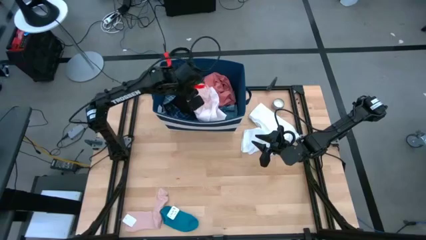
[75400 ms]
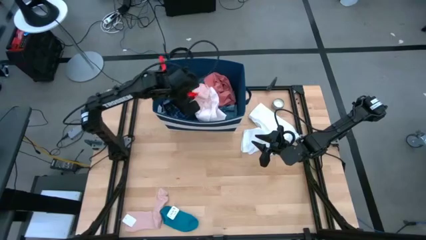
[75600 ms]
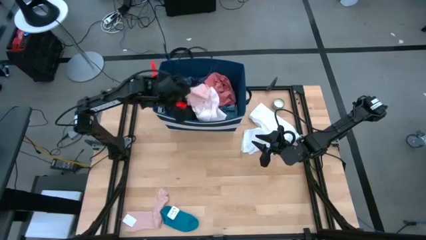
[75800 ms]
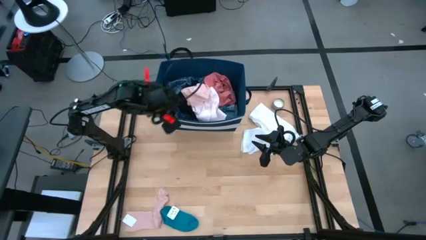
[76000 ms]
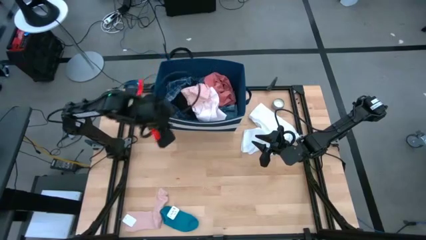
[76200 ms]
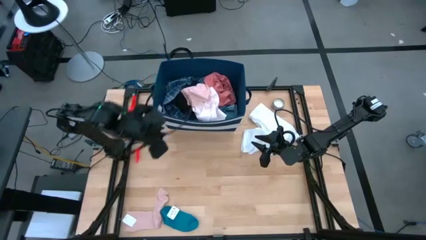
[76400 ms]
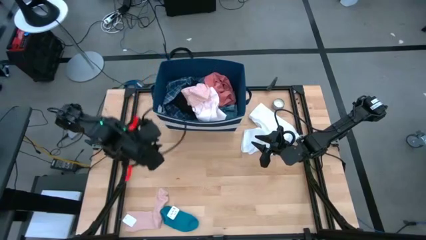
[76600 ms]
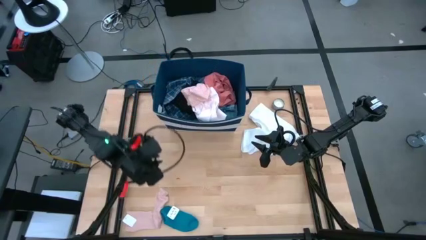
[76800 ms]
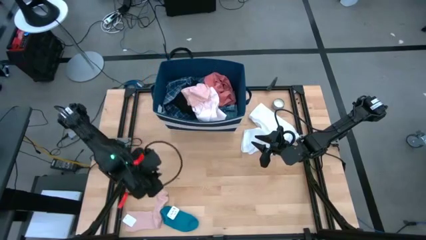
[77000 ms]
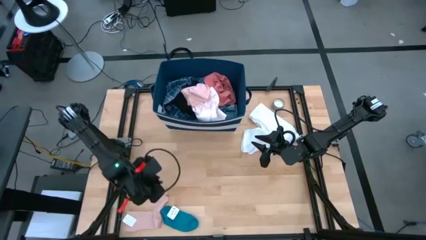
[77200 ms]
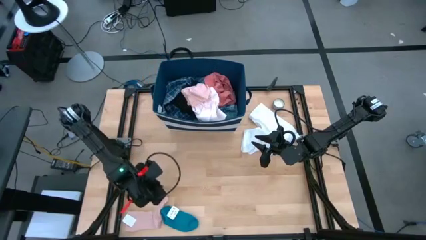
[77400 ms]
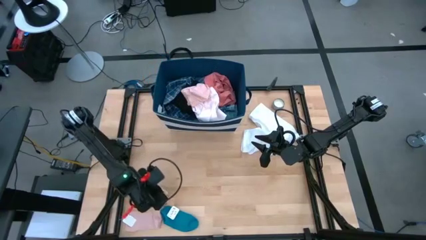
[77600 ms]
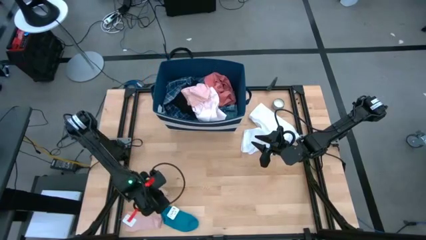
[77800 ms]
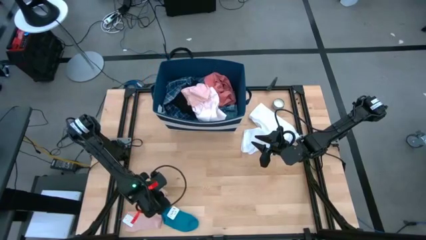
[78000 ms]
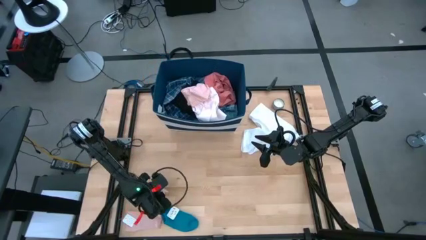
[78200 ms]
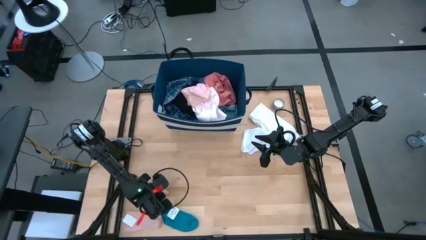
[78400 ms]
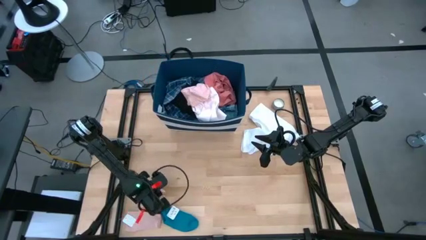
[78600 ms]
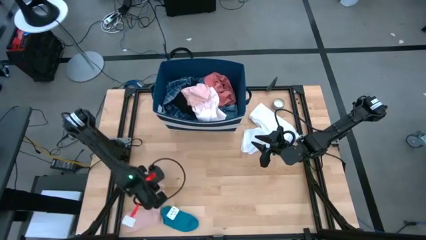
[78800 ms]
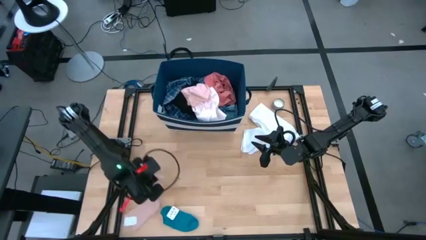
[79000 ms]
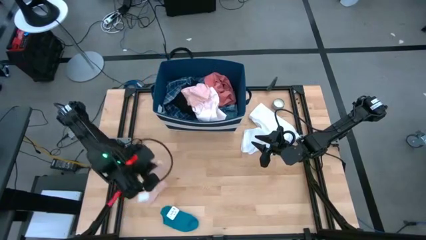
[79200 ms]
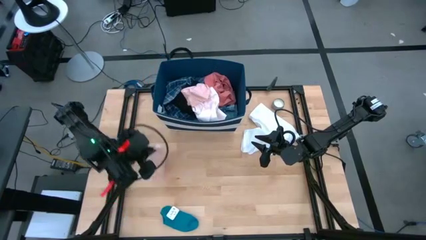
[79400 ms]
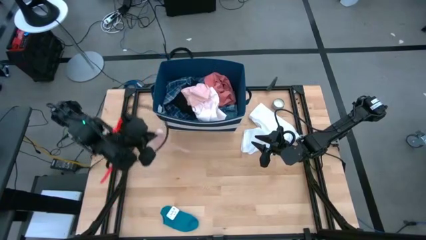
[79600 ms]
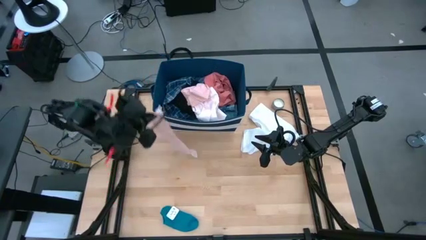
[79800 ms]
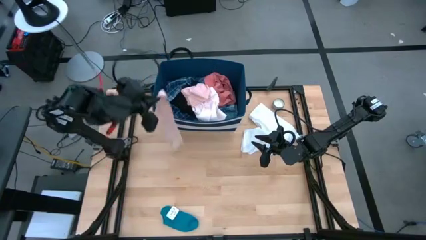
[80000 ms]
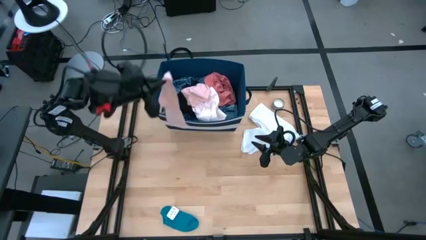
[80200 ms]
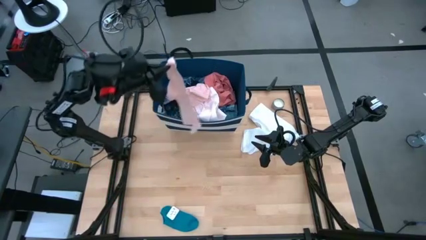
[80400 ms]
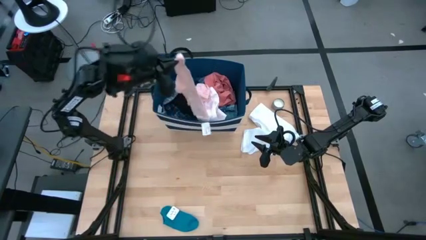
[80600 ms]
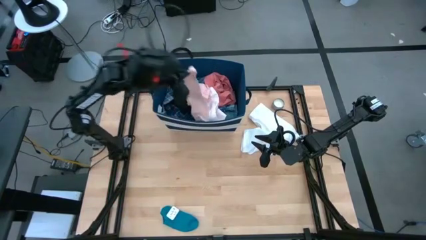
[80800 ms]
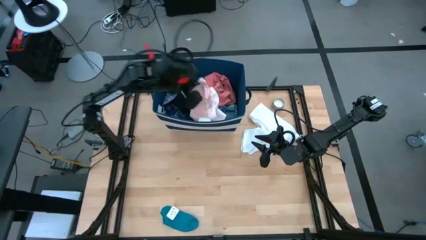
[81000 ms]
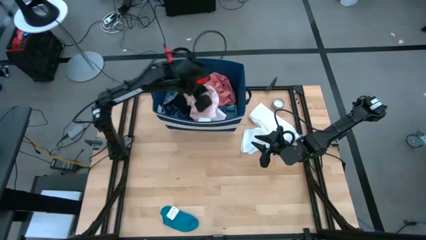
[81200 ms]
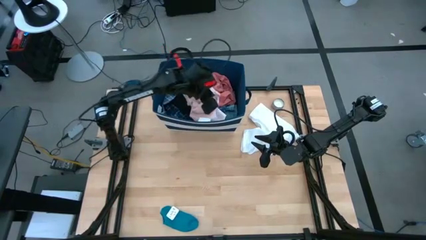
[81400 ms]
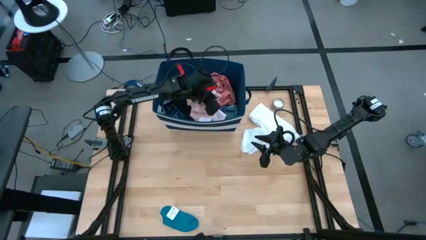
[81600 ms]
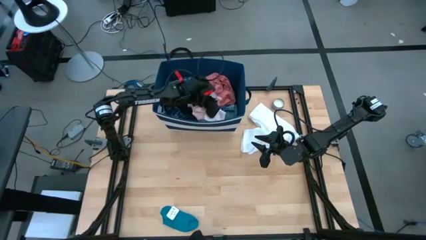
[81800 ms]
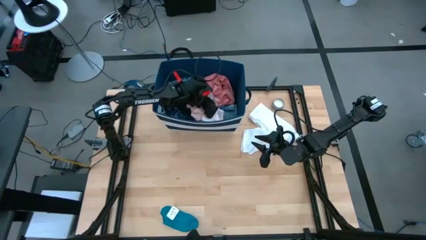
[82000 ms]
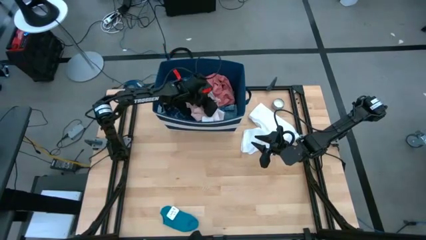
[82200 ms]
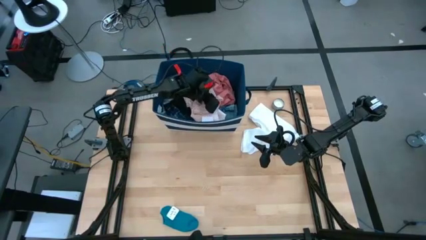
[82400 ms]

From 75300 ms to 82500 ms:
Task: Sort clothes
Put the pink sock into the blue laundry bin

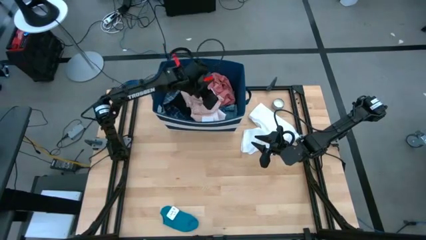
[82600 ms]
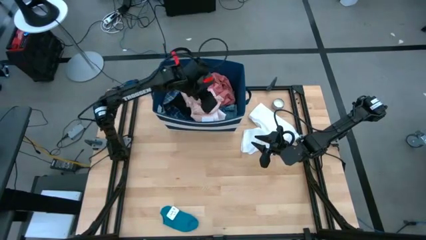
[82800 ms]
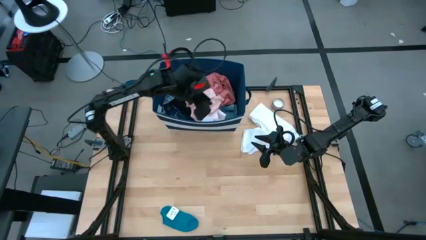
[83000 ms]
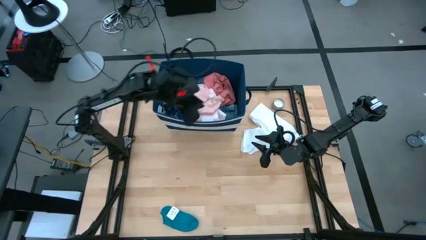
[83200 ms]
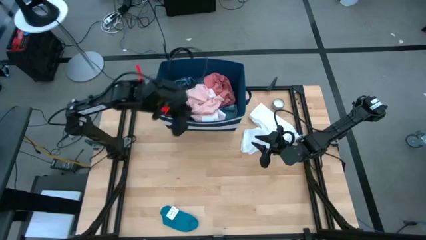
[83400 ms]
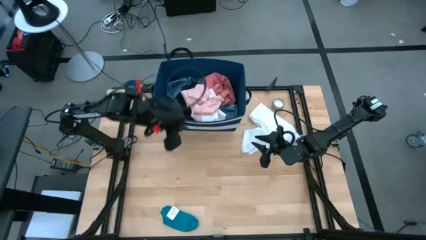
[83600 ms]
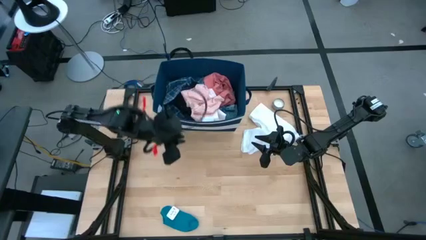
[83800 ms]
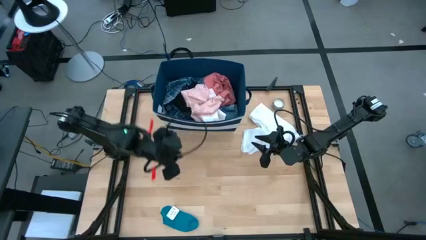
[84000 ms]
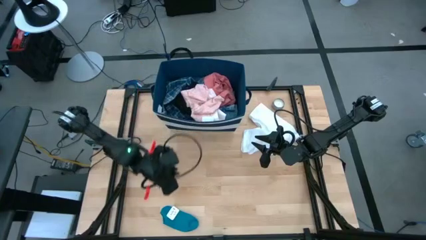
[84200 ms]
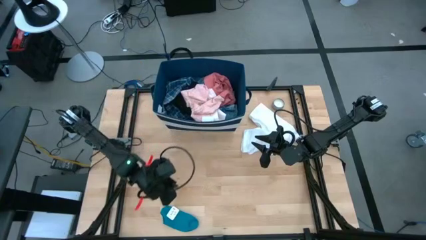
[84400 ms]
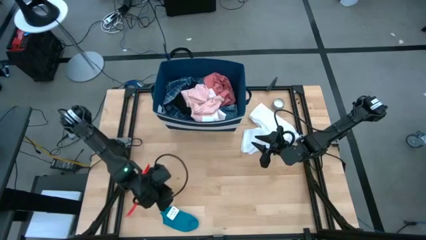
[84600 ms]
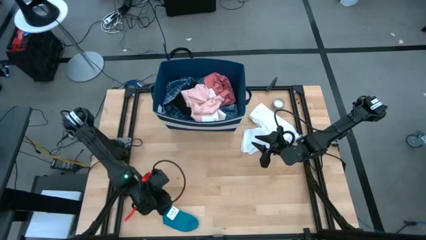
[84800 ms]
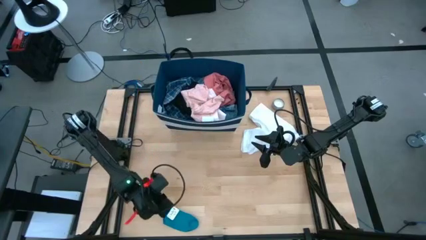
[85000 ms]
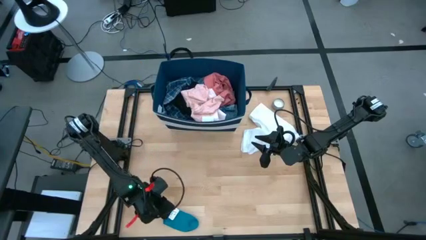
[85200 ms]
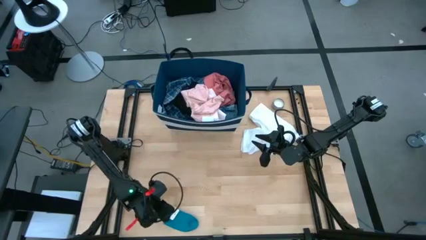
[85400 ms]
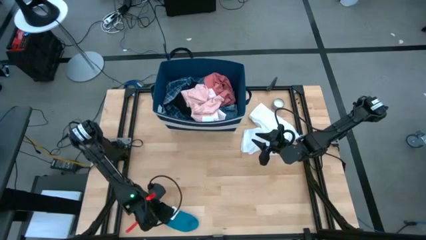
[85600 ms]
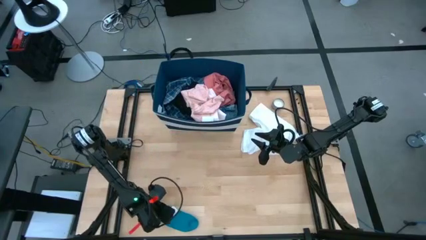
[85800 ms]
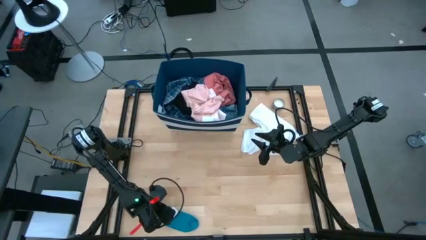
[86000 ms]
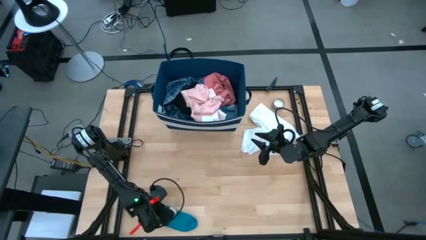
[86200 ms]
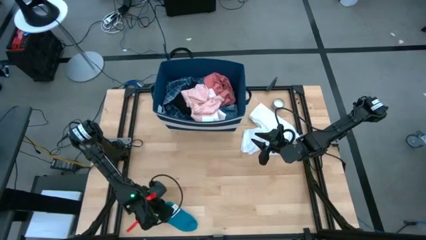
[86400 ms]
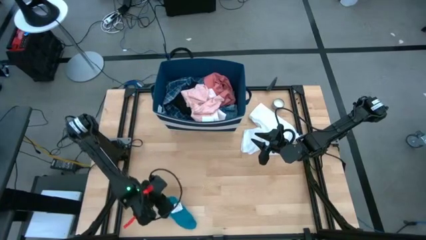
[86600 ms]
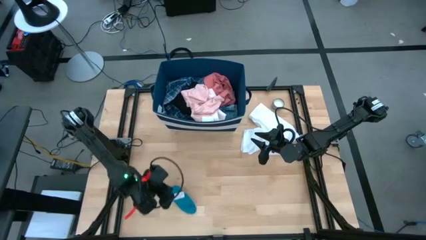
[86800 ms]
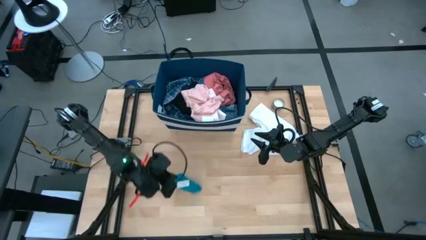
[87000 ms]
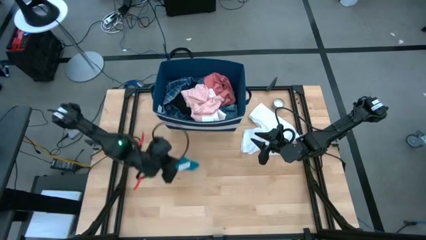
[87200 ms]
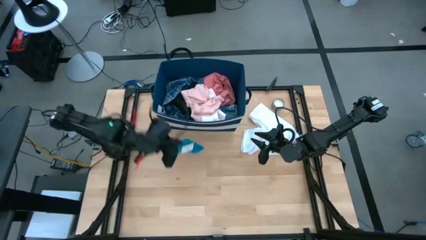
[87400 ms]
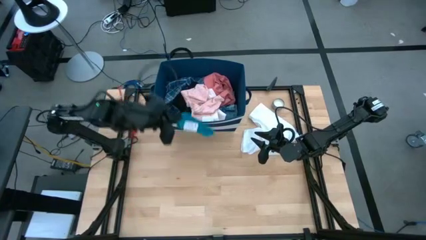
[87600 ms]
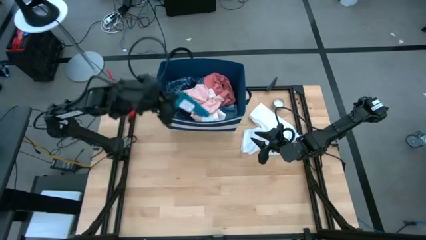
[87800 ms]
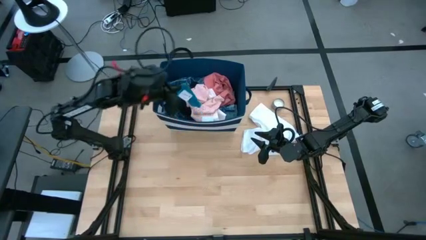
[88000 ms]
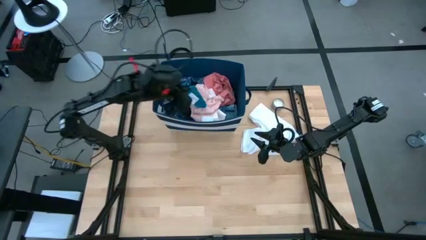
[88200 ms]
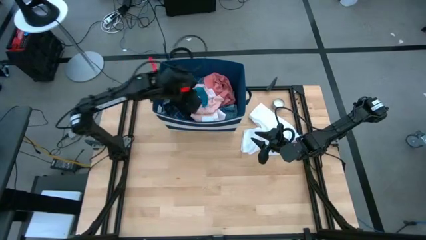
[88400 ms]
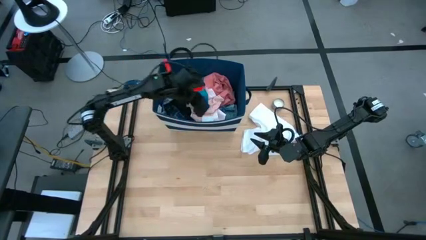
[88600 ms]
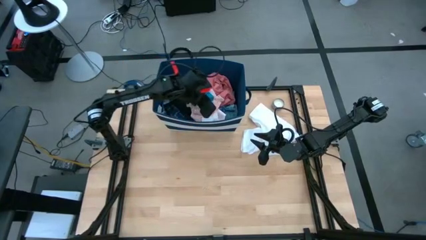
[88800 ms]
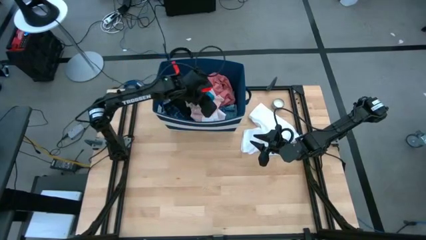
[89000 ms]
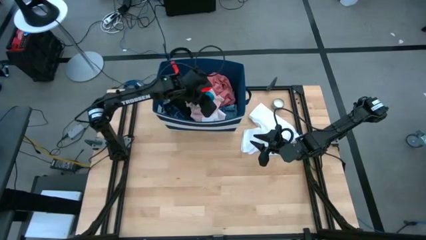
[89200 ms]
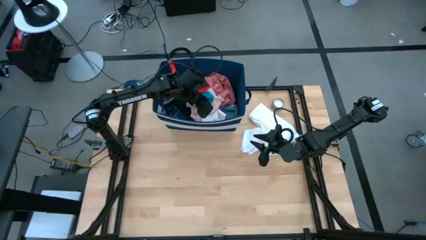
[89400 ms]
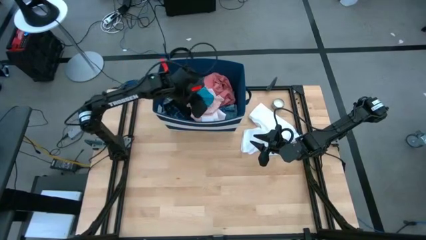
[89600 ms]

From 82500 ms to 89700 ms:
Put the blue sock into the blue laundry bin

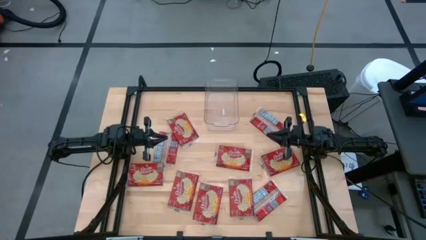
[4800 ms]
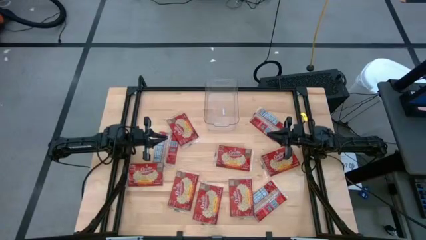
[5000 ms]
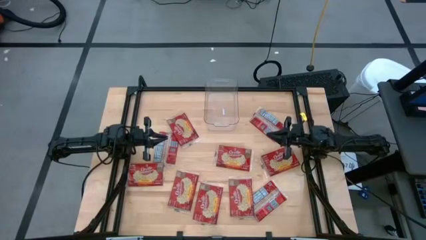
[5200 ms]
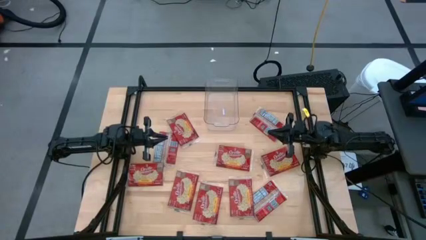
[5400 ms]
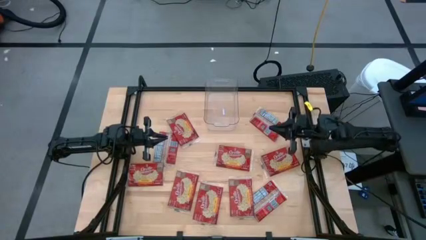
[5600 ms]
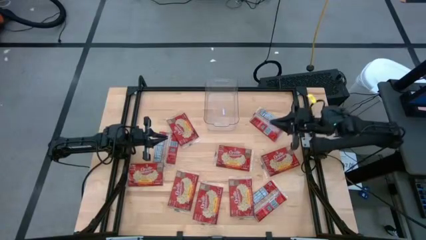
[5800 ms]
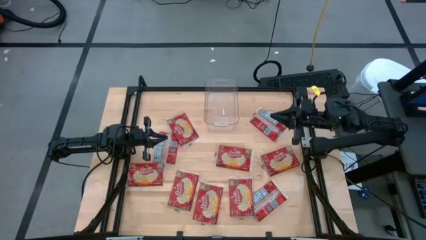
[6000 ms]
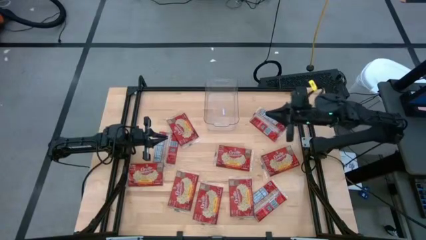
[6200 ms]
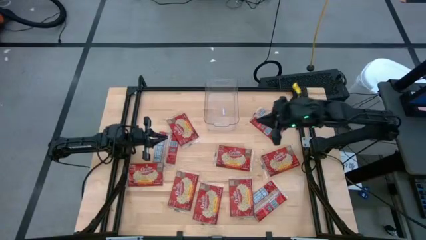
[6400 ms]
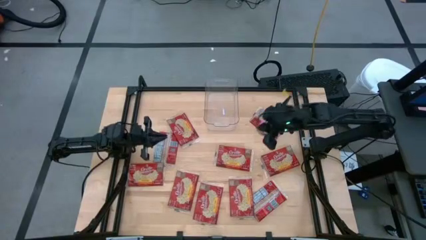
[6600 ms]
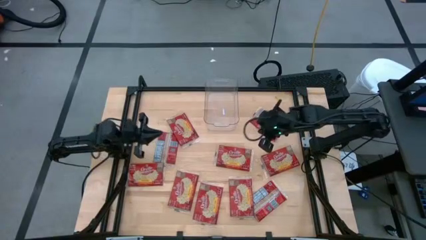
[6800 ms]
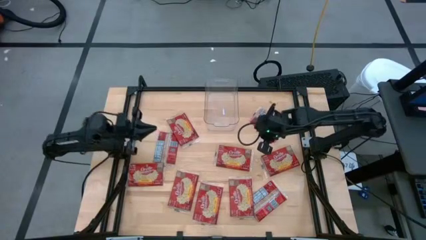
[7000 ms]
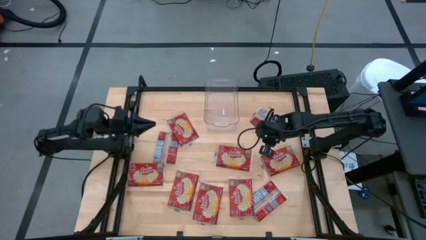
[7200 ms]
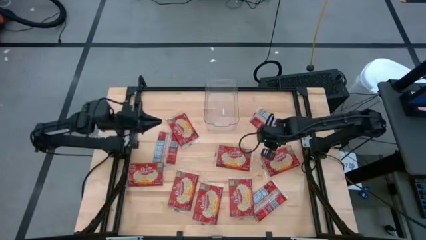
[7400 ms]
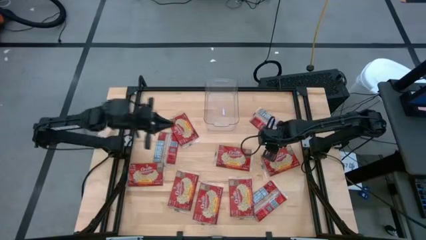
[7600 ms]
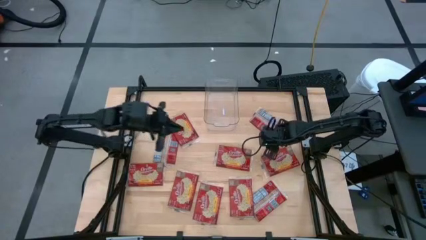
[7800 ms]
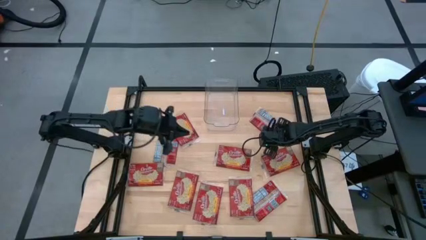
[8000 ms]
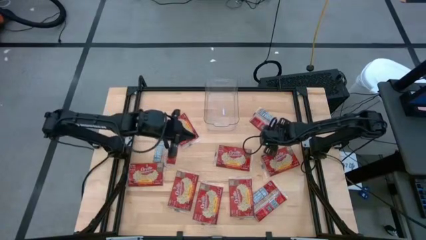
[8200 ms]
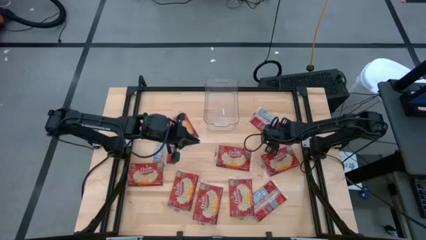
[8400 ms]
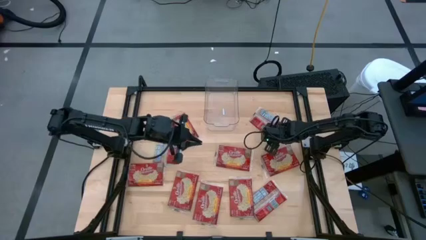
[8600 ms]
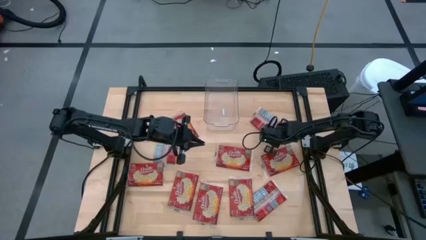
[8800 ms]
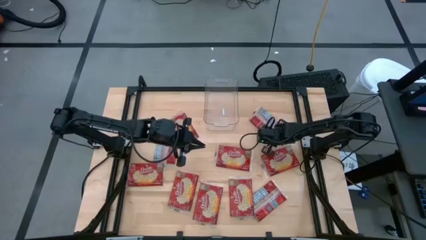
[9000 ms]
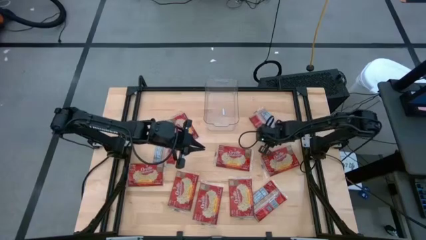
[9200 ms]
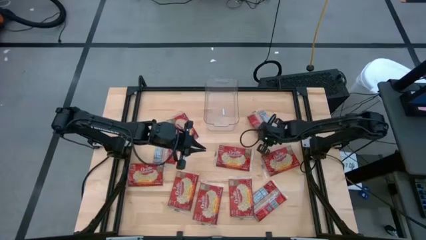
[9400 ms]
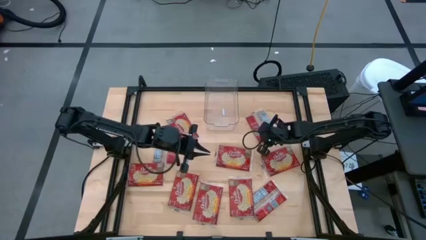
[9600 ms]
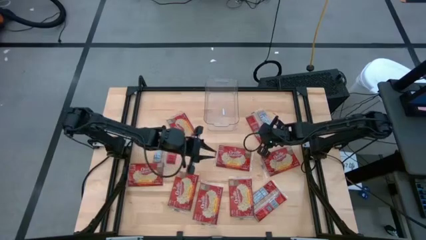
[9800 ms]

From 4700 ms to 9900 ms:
Task: Sort popcorn bags into baskets
Put the red popcorn pack into the transparent bin
